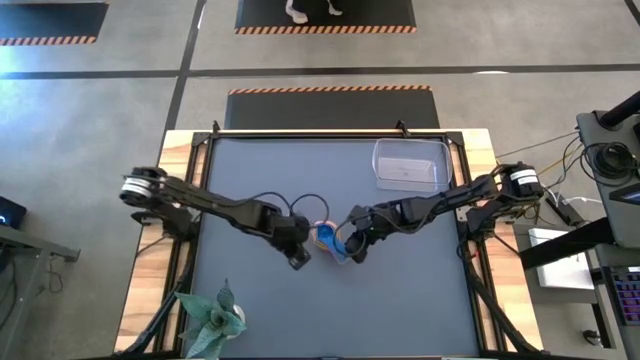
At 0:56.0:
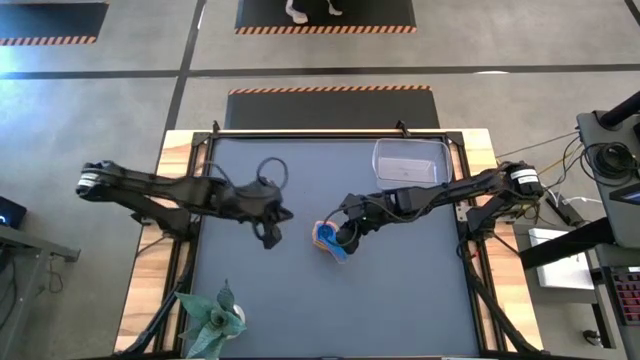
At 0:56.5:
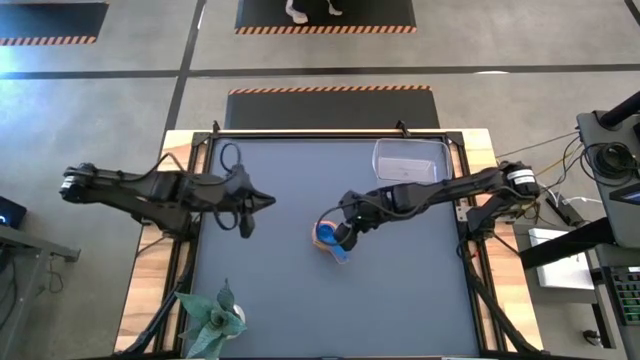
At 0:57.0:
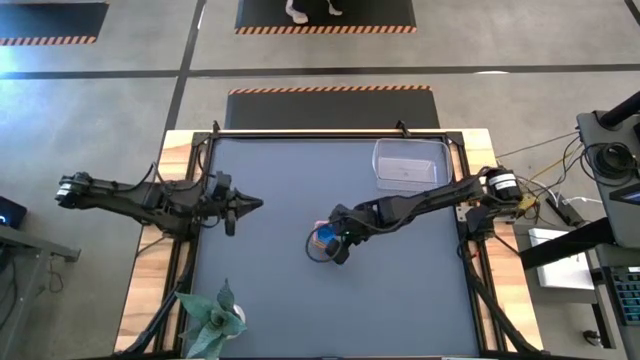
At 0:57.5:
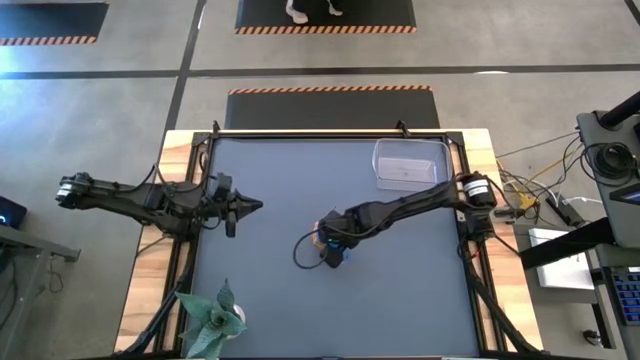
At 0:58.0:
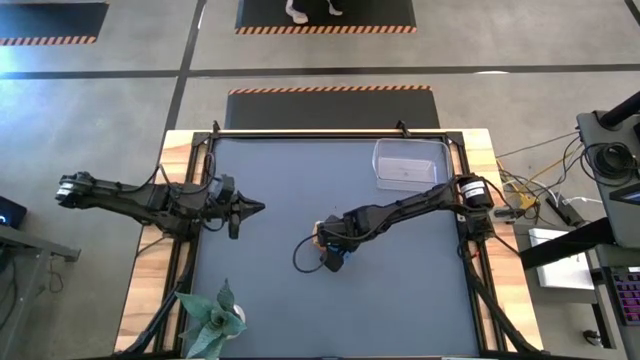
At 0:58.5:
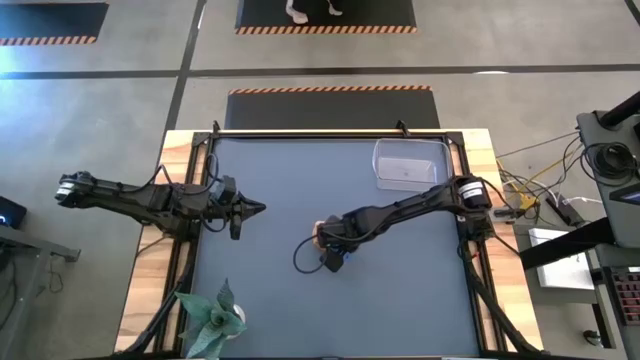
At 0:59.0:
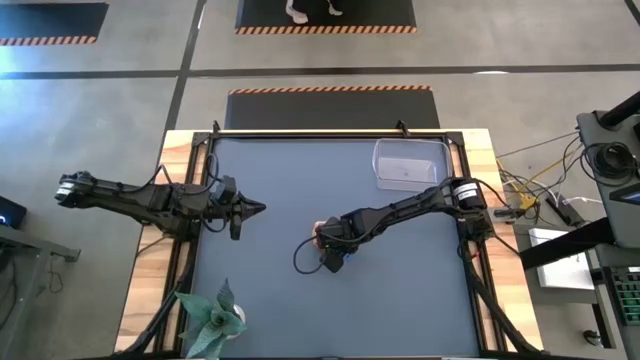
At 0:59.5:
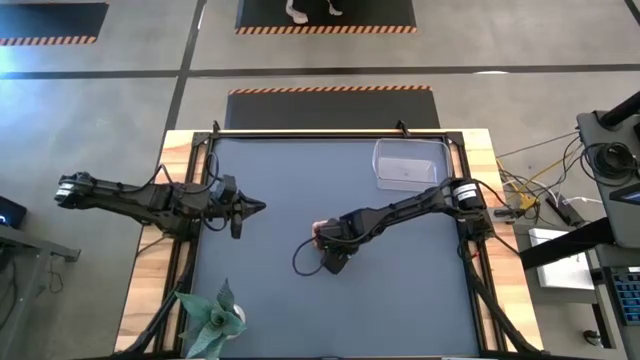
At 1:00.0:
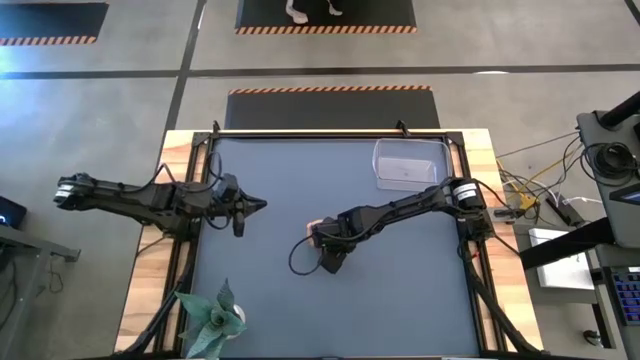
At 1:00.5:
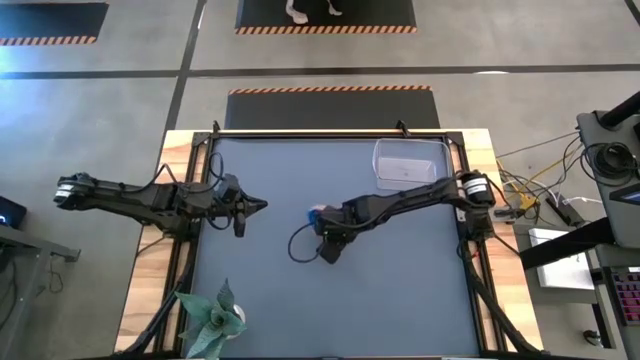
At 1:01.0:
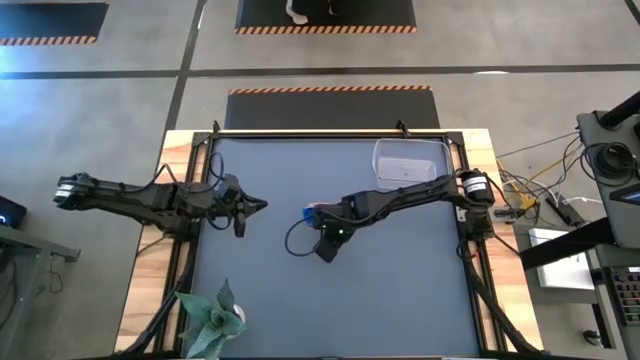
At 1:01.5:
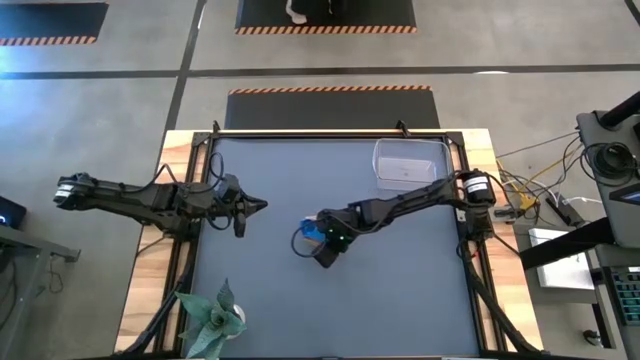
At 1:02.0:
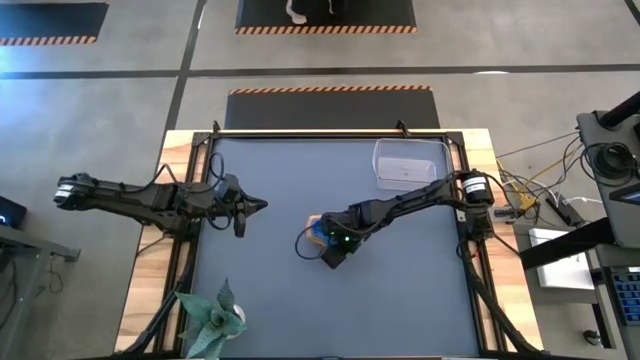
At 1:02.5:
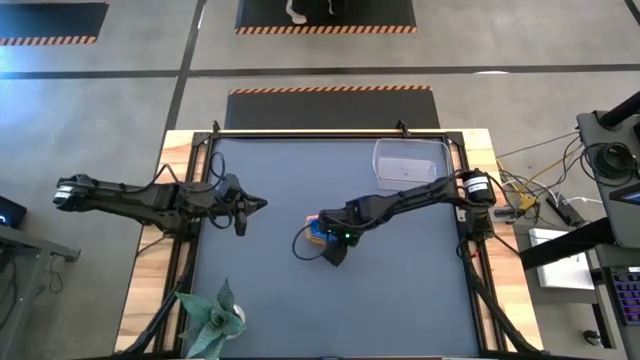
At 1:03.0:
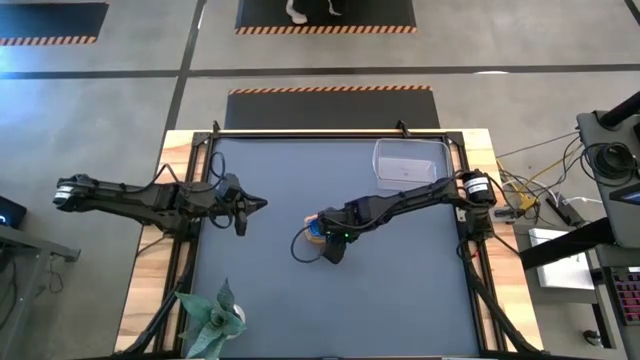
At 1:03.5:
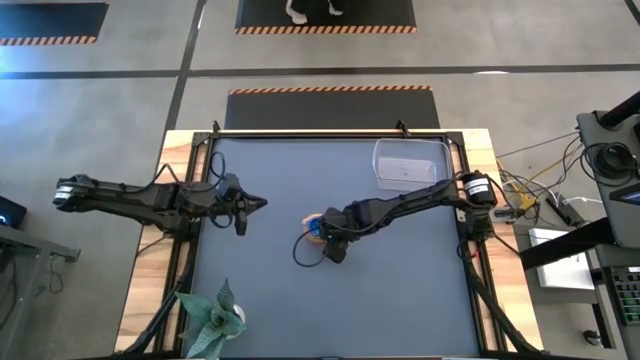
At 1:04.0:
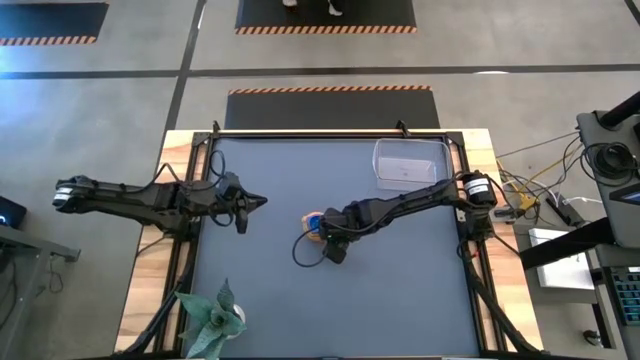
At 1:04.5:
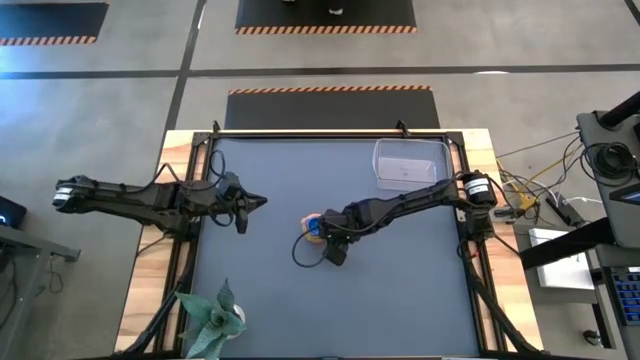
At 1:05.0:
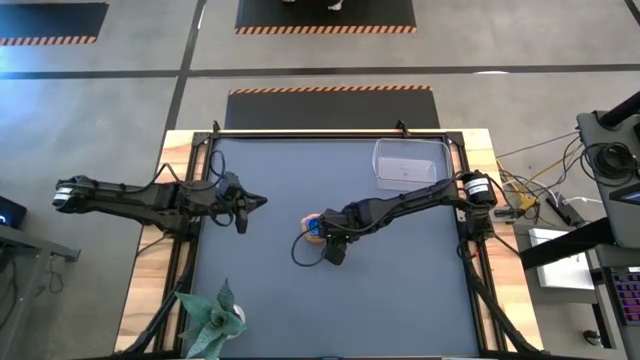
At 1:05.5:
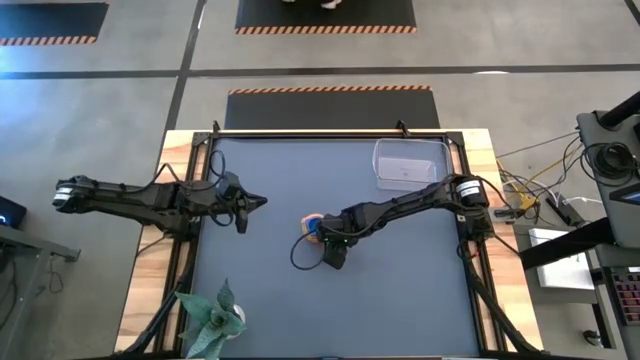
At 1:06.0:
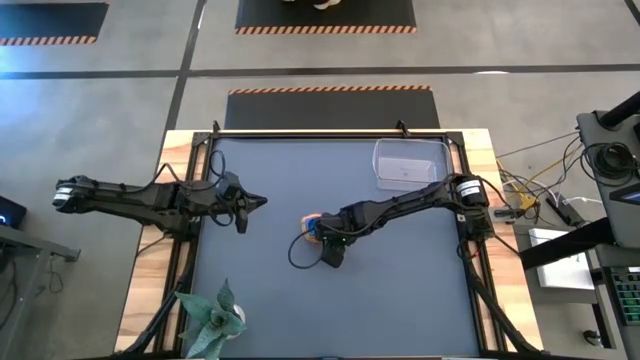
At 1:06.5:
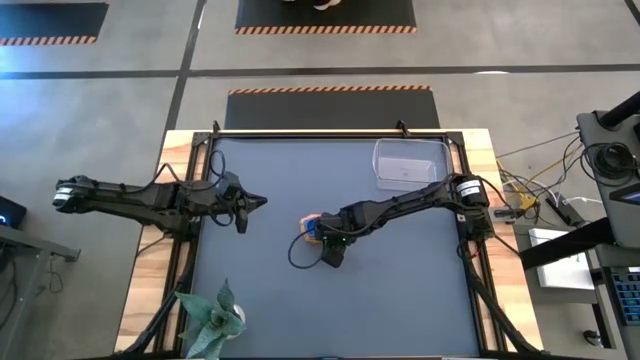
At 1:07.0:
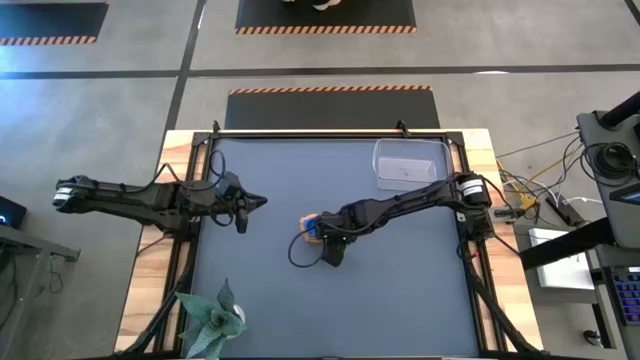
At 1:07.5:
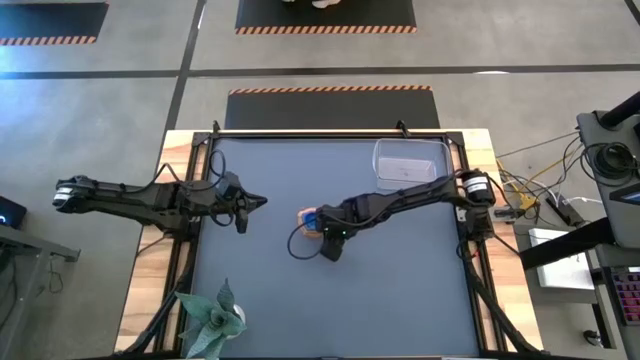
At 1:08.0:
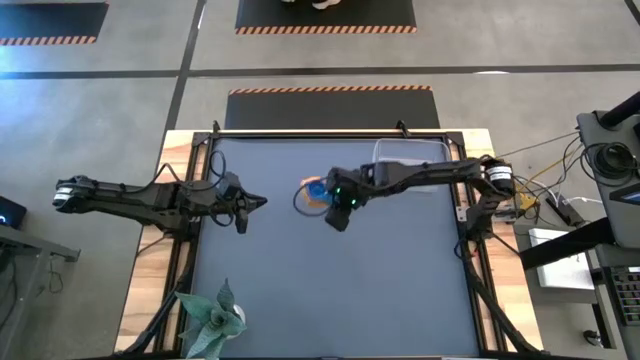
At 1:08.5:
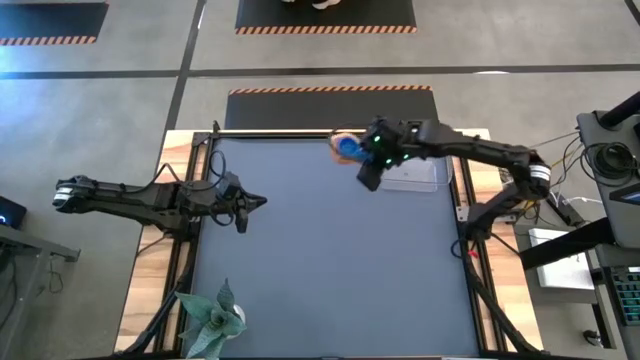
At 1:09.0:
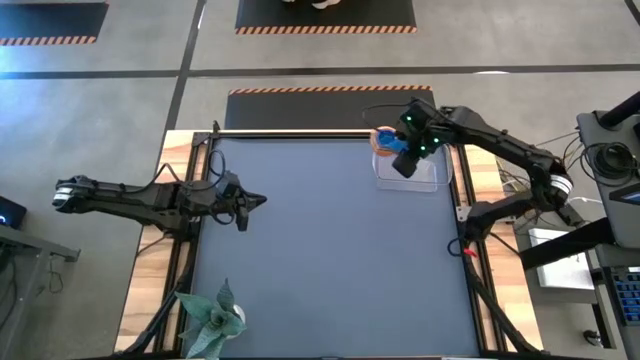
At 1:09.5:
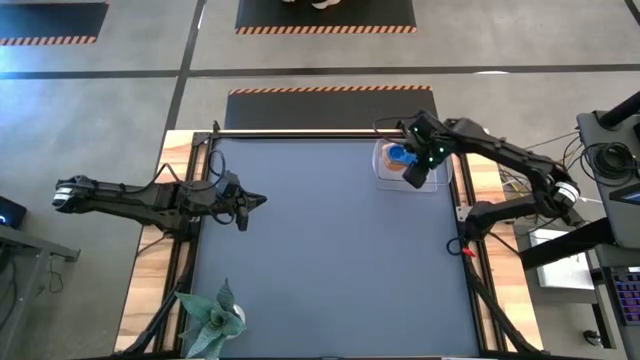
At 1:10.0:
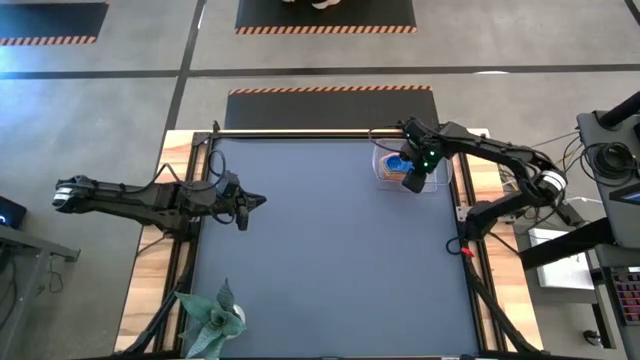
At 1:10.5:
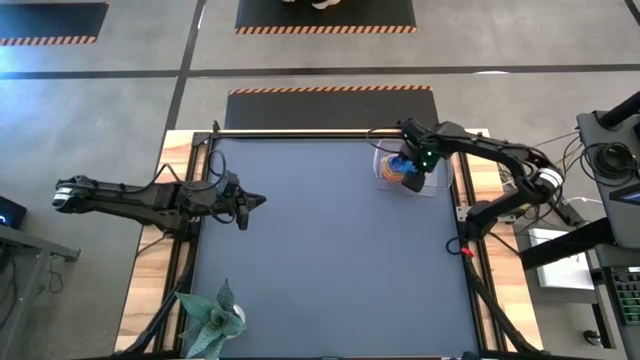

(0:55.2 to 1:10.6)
Task: Nest measuring cups in basket
Put the nested measuring cups into the transparent bin

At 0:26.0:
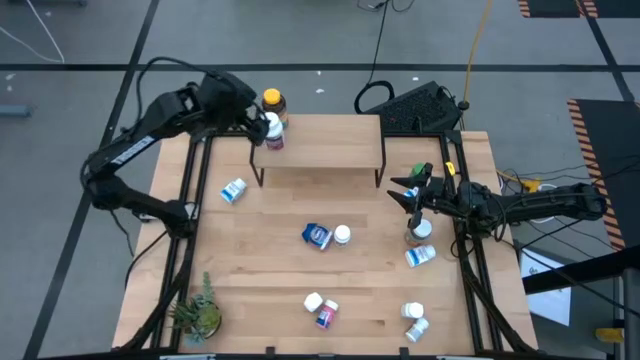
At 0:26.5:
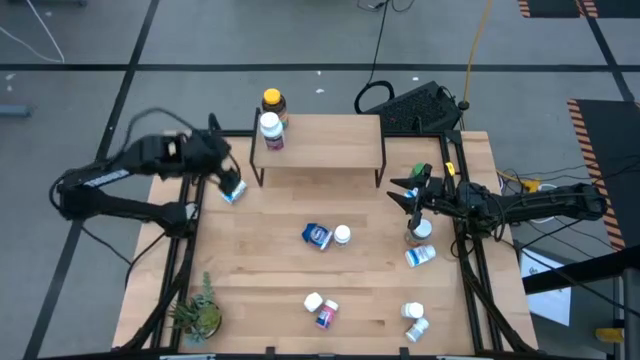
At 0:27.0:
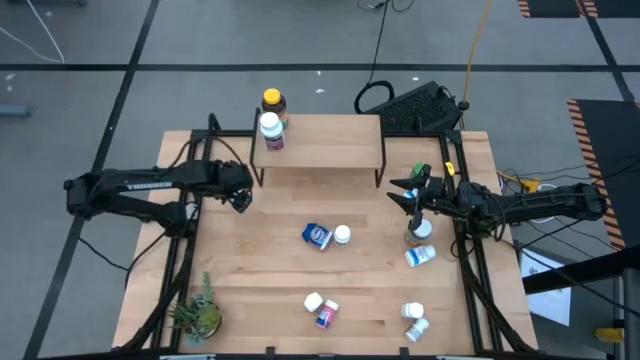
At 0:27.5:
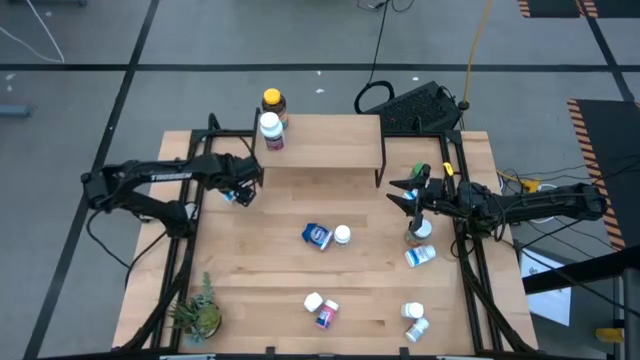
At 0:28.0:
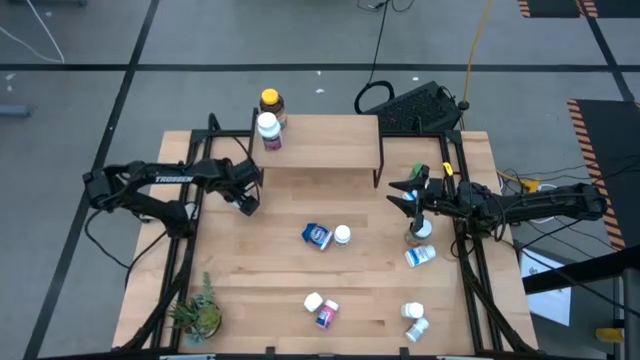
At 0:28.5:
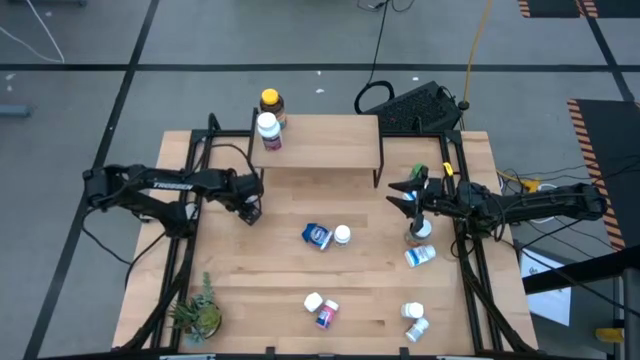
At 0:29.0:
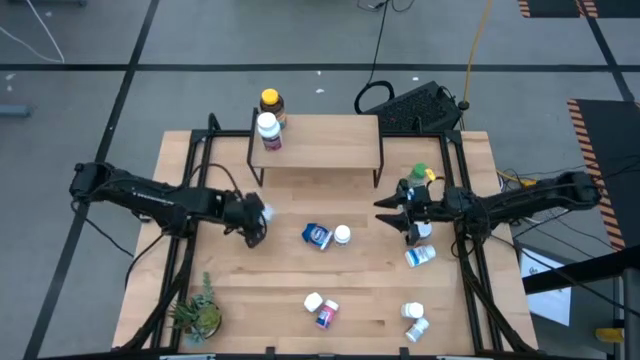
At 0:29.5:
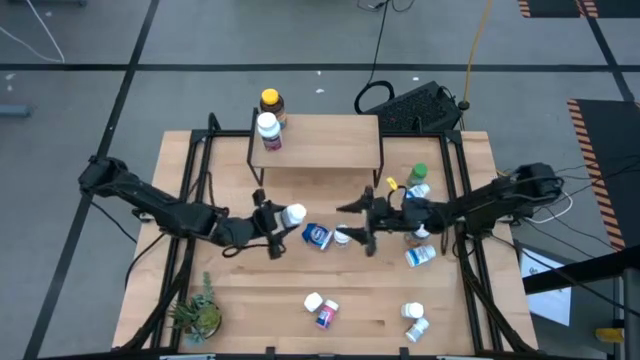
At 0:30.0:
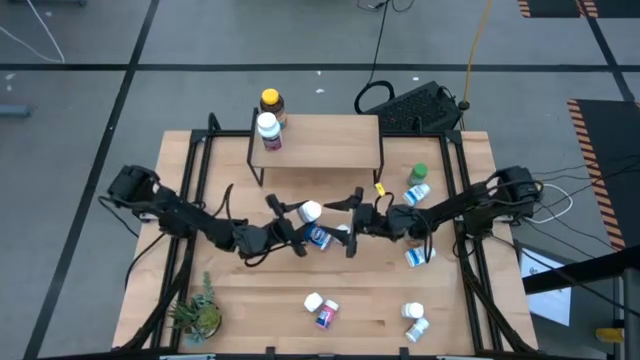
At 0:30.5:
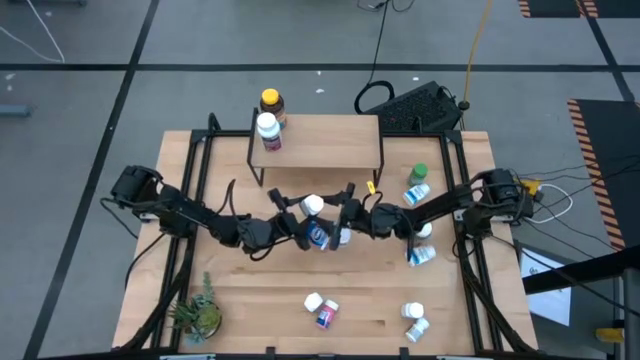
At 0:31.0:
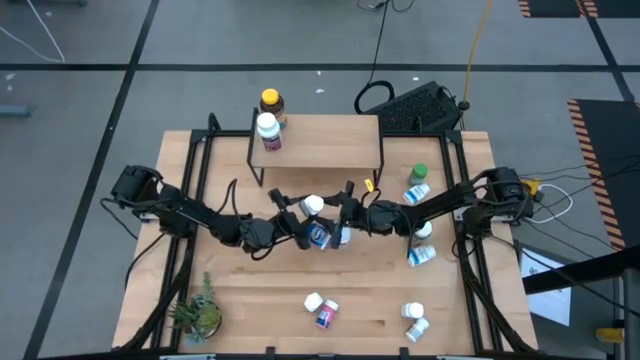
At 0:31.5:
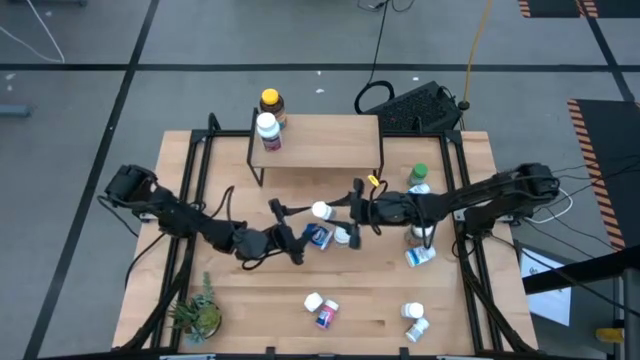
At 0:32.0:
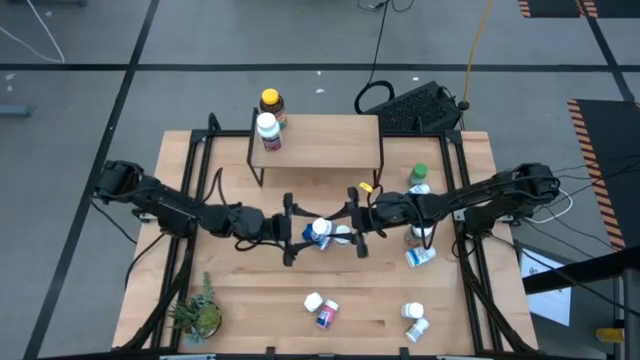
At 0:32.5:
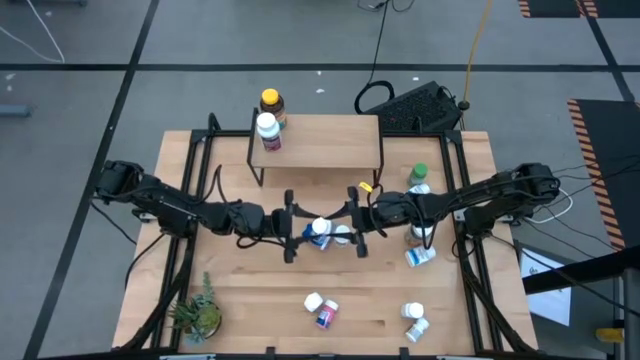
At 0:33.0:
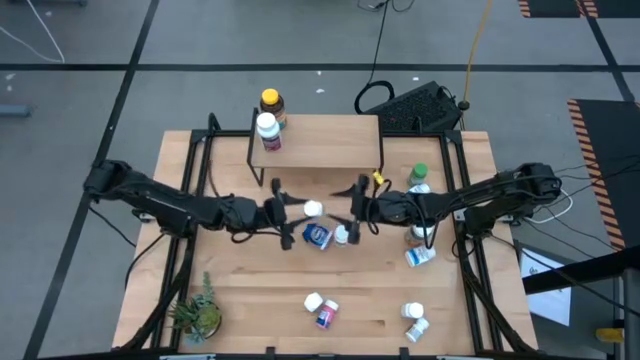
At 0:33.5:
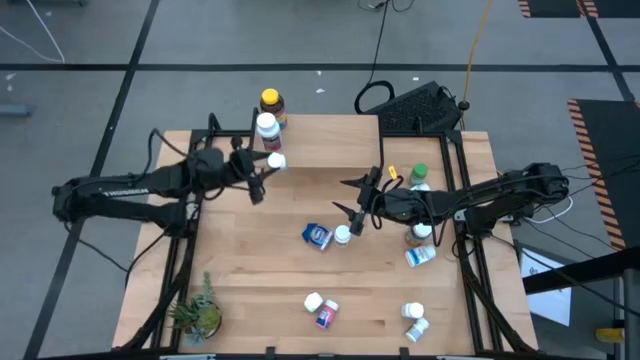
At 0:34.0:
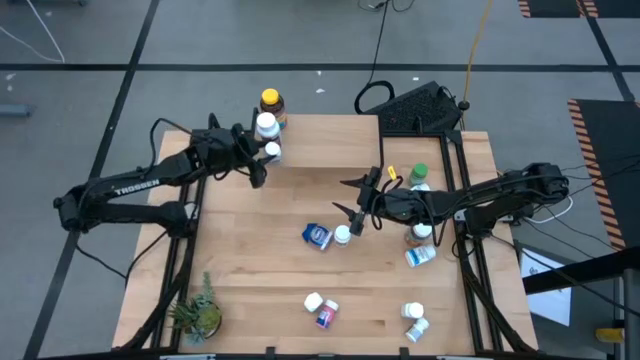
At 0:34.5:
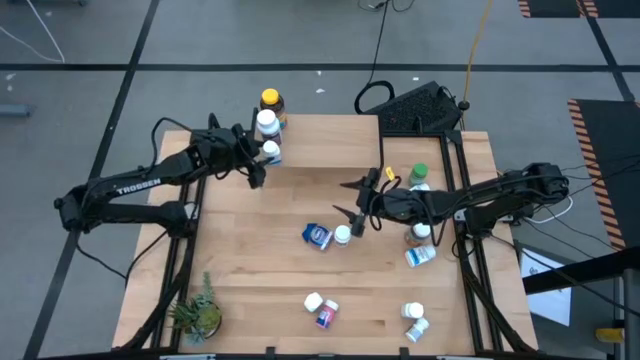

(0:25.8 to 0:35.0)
Task: Pick and place medicine bottles onto shelf by color
Put the white blue medicine bottle on the shelf
